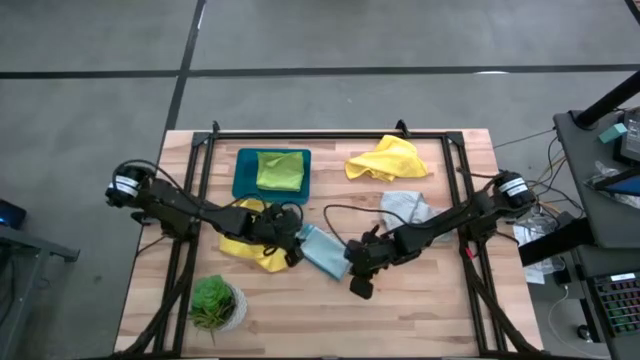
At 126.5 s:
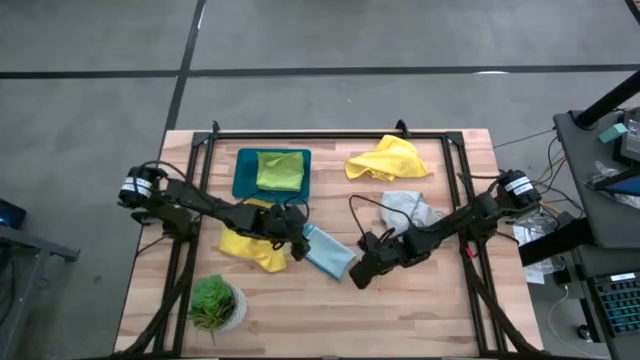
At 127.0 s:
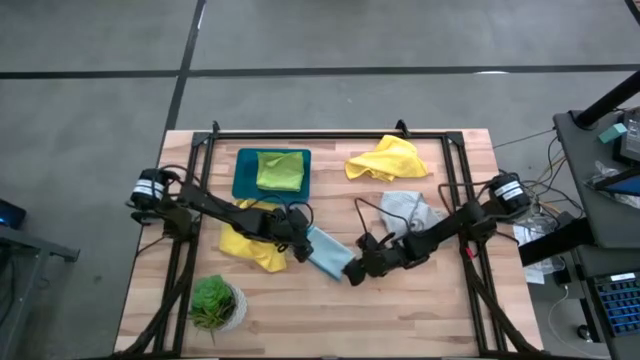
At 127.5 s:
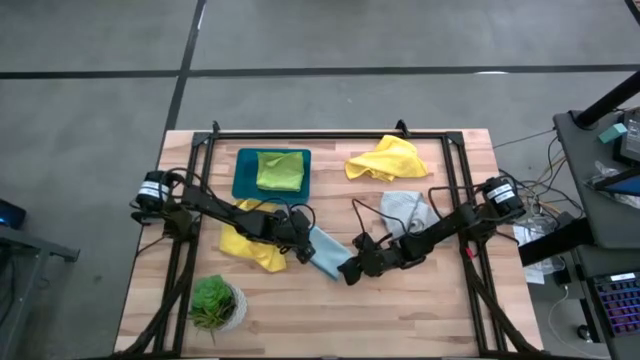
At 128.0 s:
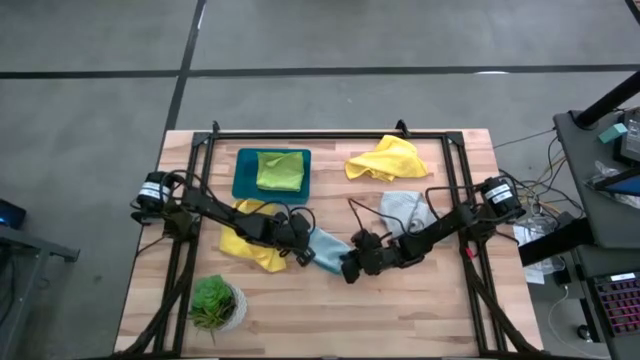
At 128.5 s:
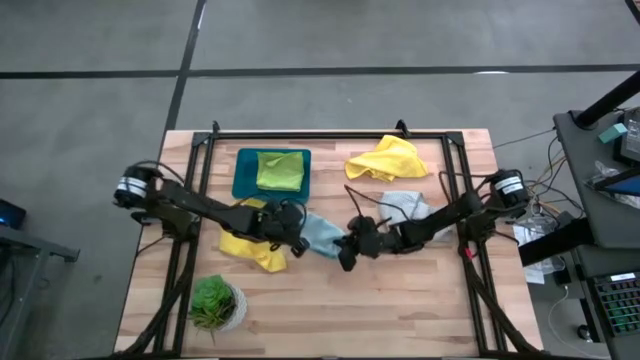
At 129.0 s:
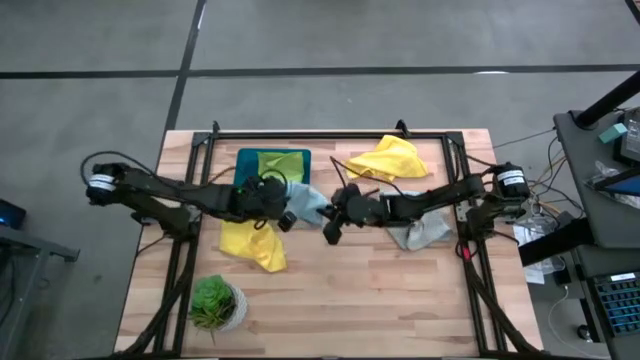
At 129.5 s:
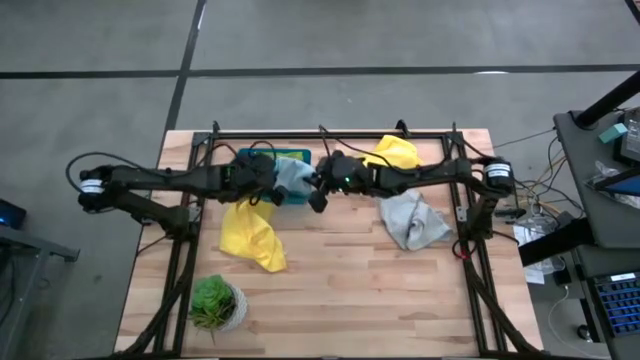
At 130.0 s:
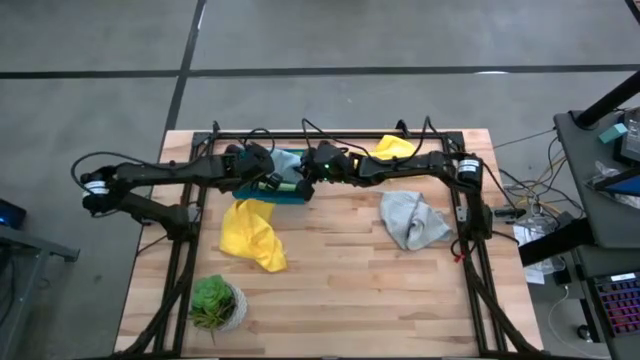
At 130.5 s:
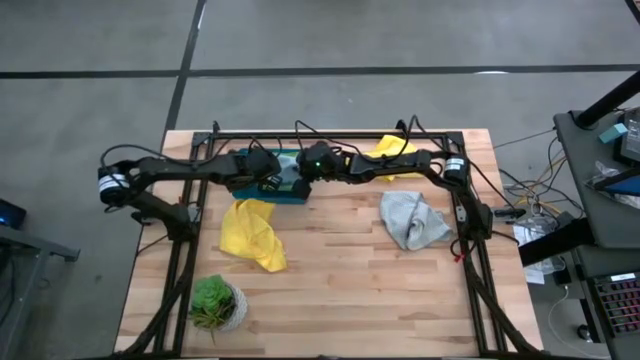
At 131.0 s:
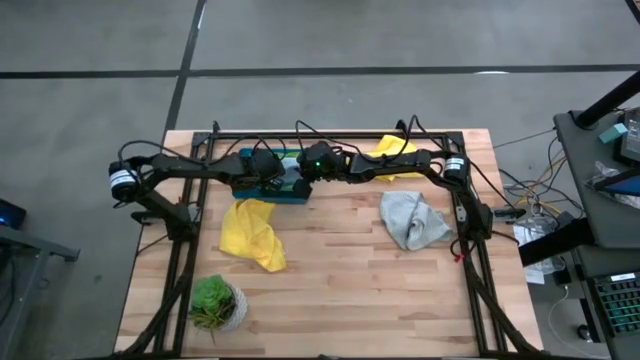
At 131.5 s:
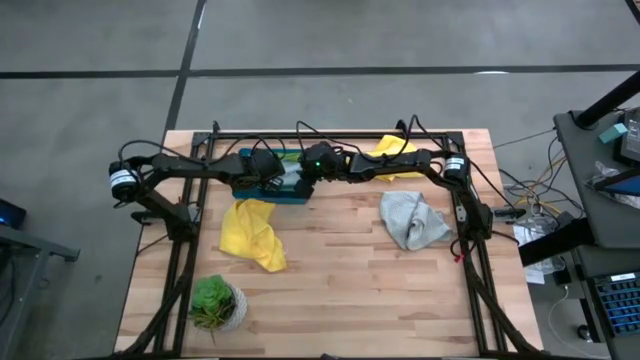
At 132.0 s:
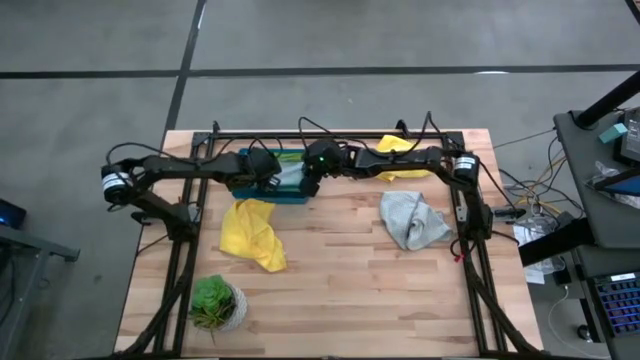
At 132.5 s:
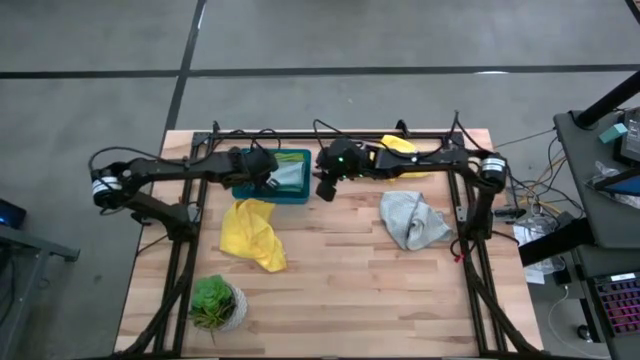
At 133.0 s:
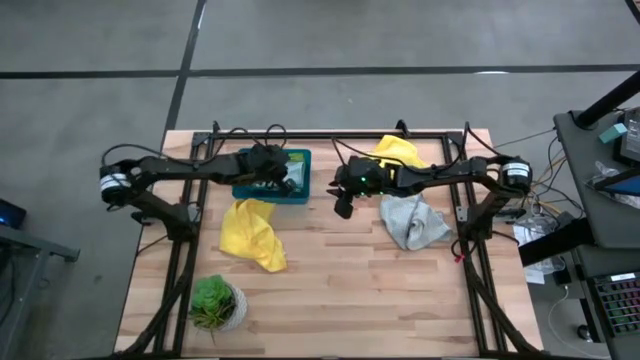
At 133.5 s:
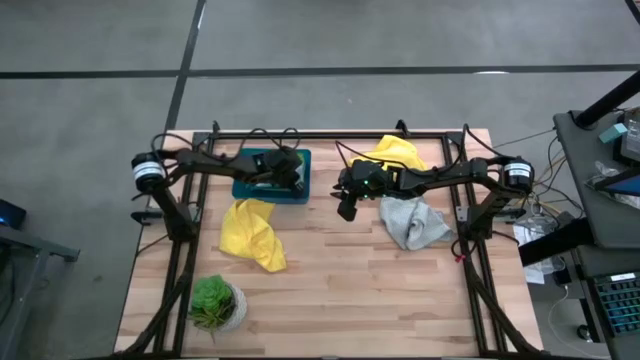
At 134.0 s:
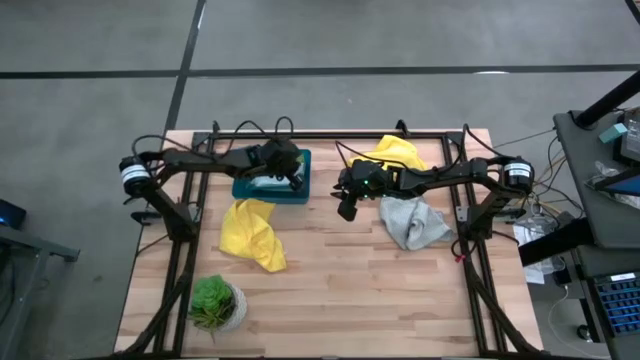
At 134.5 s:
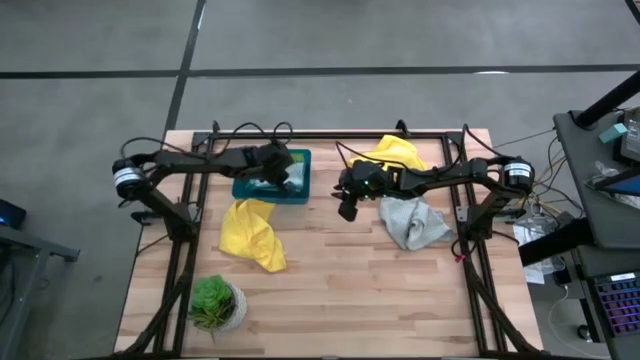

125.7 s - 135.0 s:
Task: Fold microfiber towels
Put the blue microfiber towel into the blue bin

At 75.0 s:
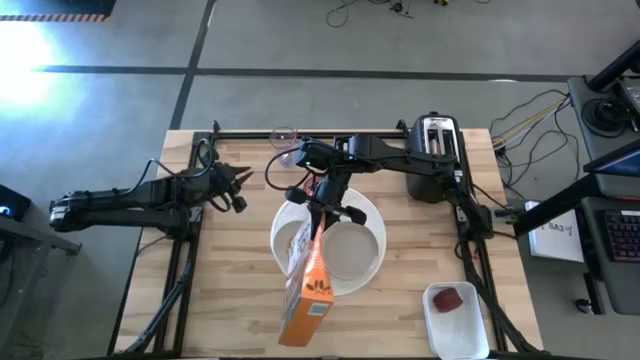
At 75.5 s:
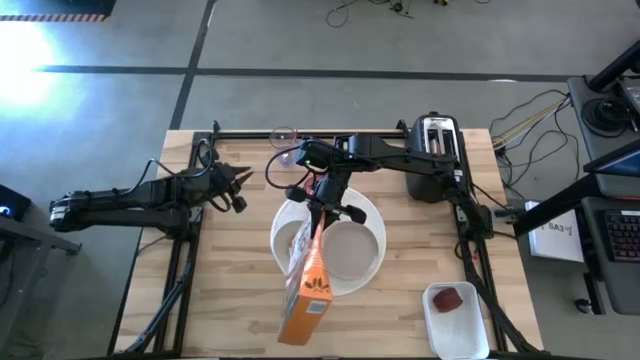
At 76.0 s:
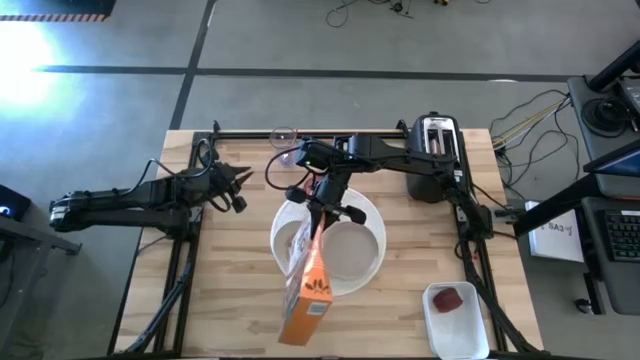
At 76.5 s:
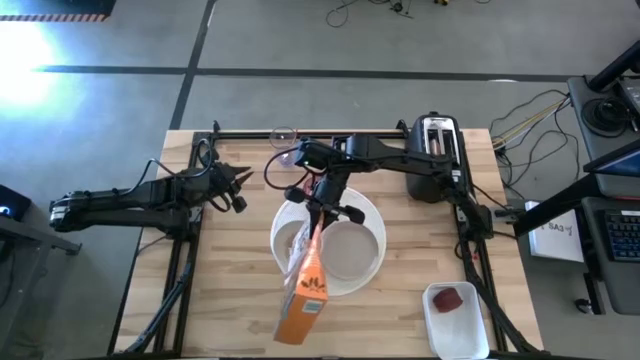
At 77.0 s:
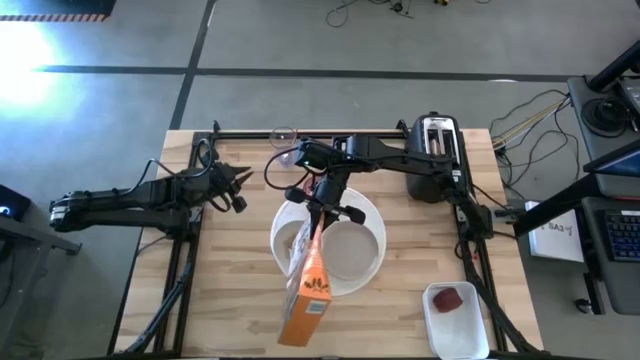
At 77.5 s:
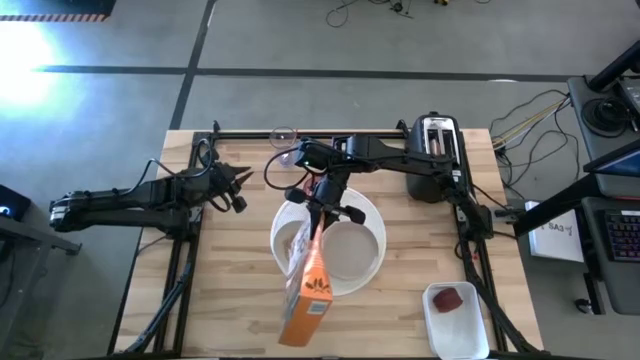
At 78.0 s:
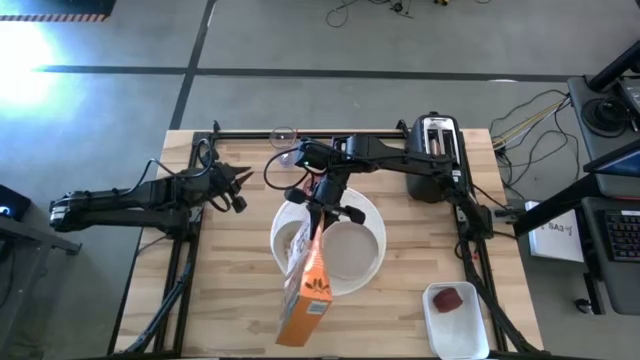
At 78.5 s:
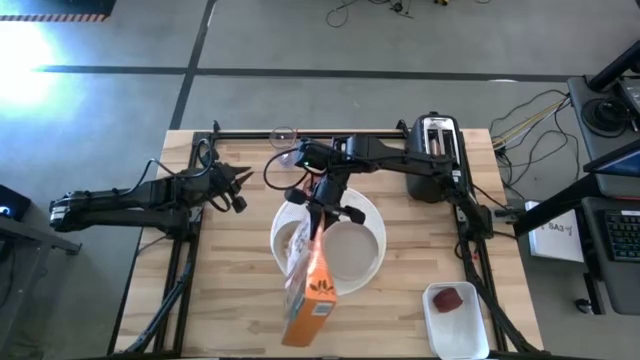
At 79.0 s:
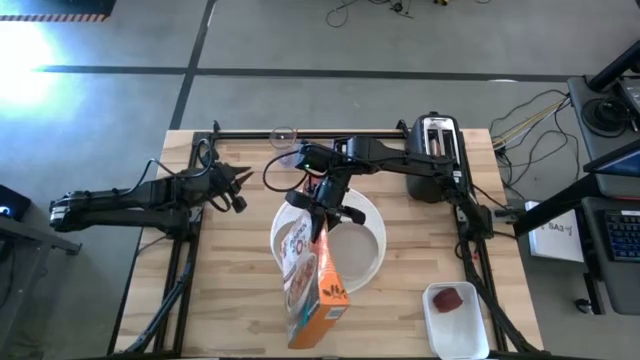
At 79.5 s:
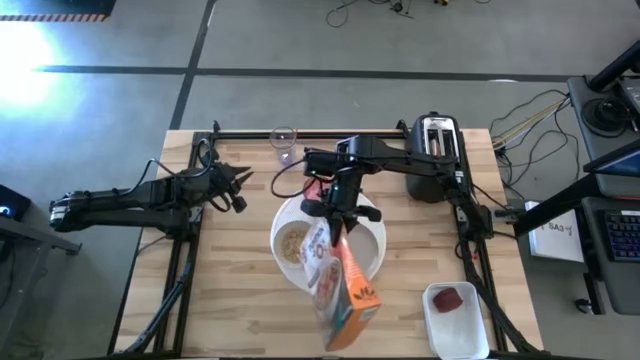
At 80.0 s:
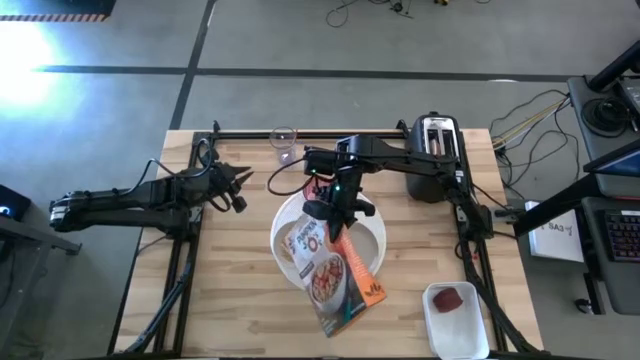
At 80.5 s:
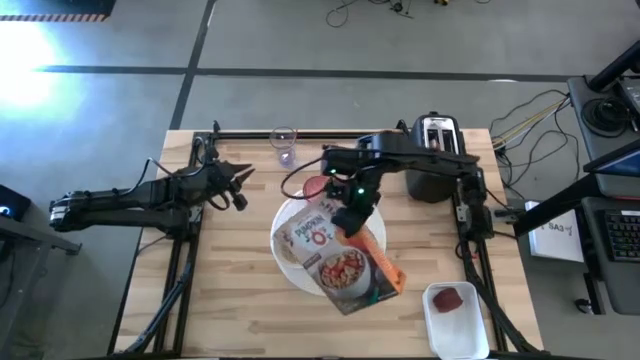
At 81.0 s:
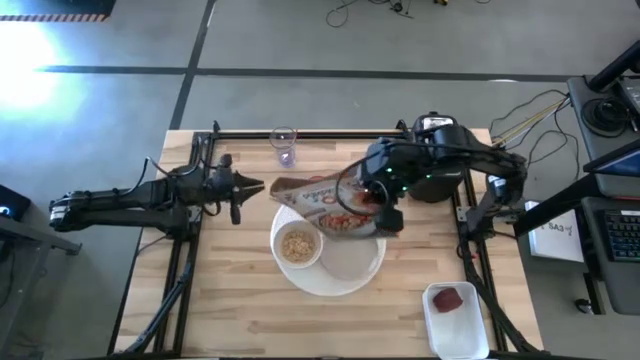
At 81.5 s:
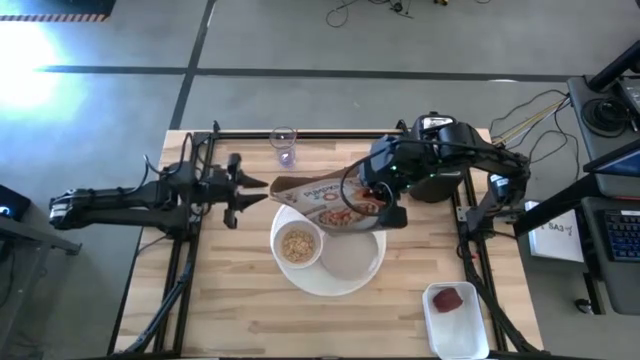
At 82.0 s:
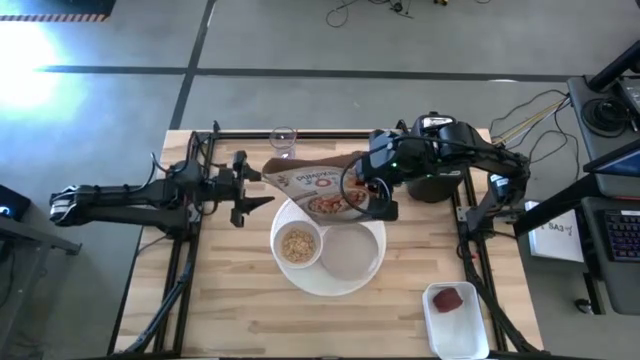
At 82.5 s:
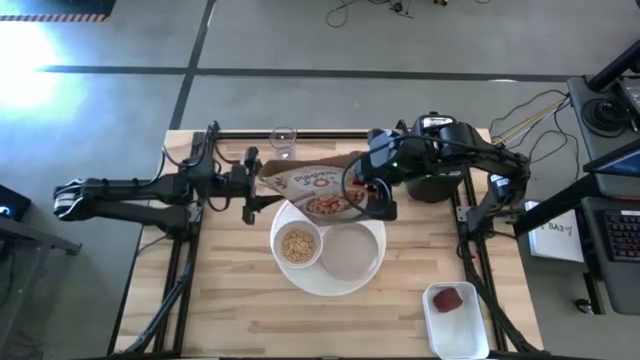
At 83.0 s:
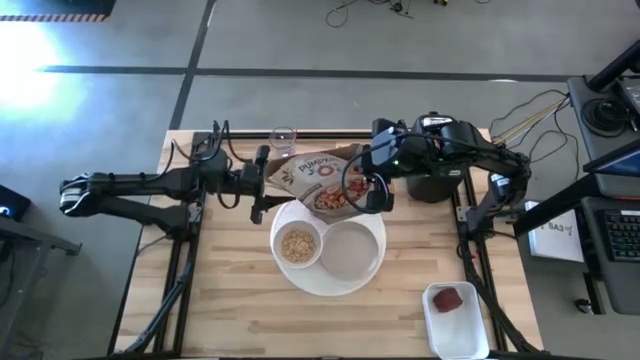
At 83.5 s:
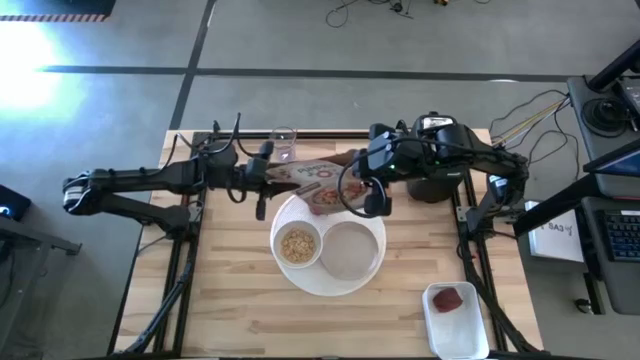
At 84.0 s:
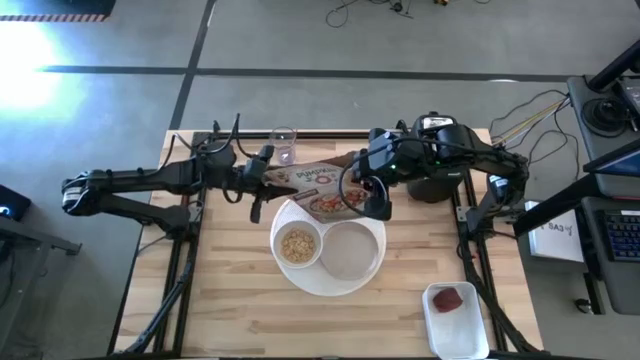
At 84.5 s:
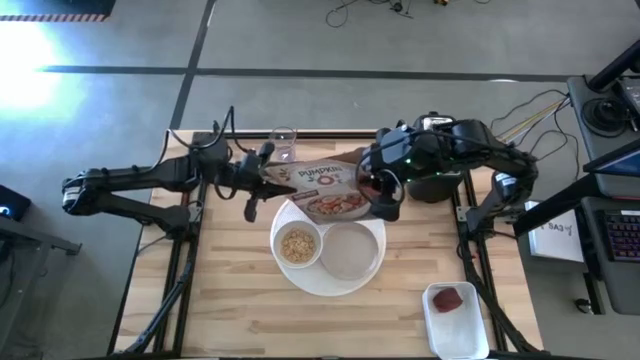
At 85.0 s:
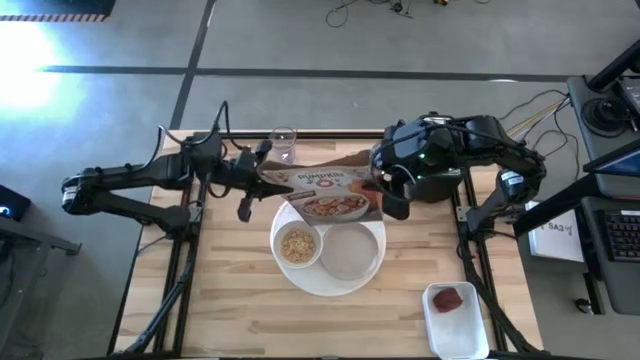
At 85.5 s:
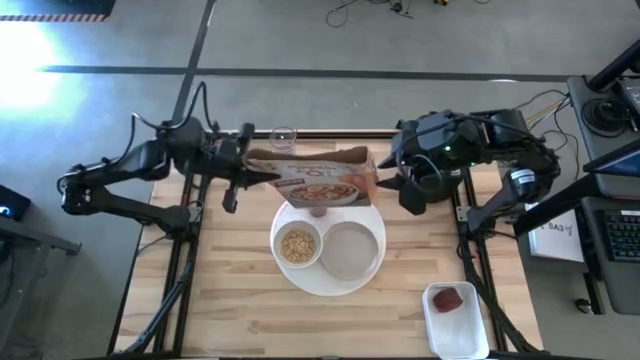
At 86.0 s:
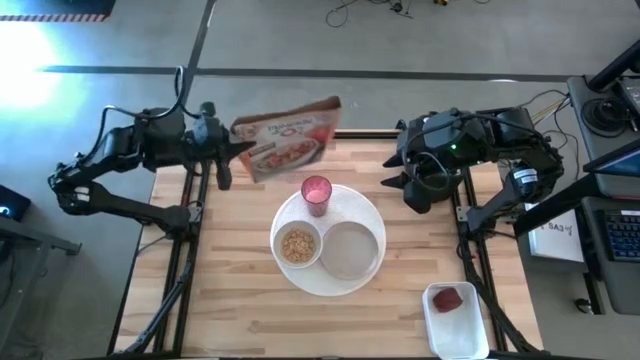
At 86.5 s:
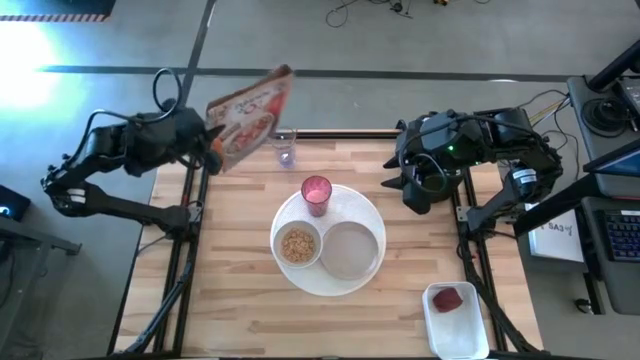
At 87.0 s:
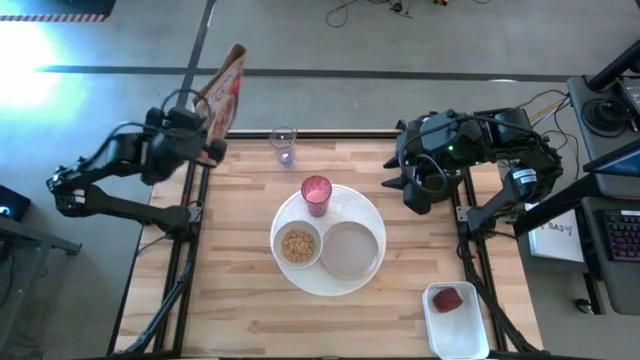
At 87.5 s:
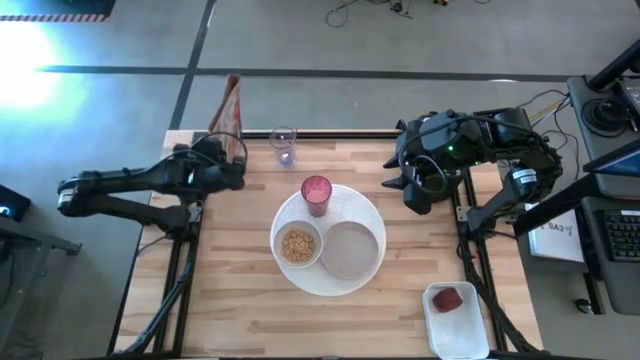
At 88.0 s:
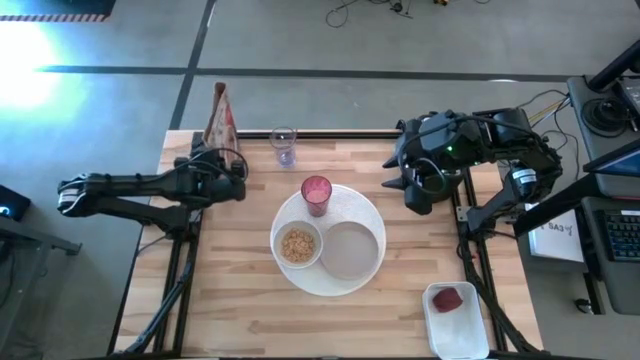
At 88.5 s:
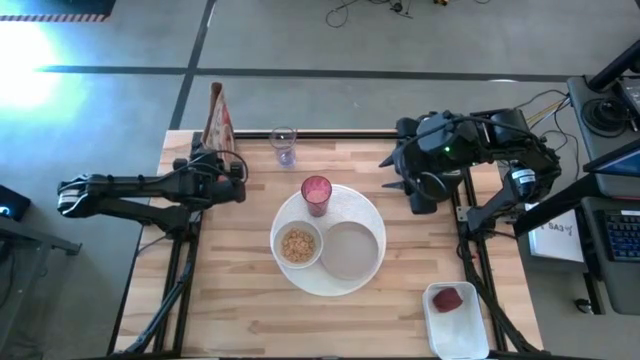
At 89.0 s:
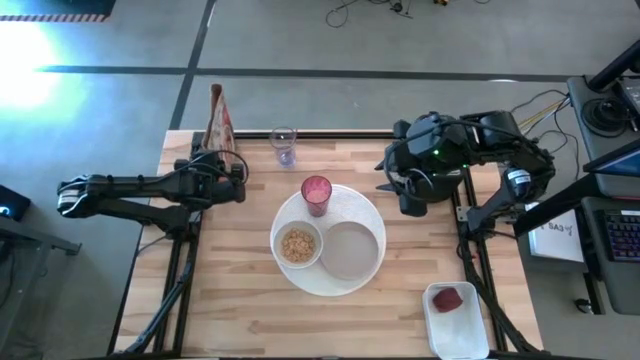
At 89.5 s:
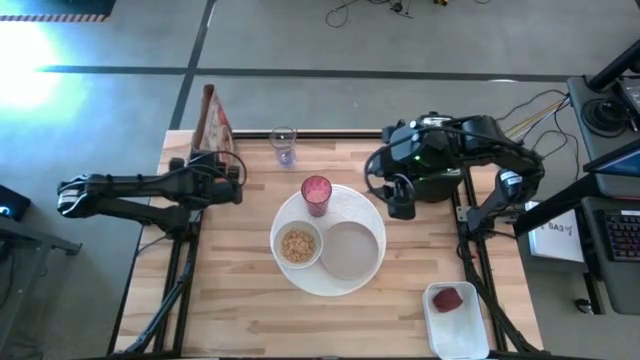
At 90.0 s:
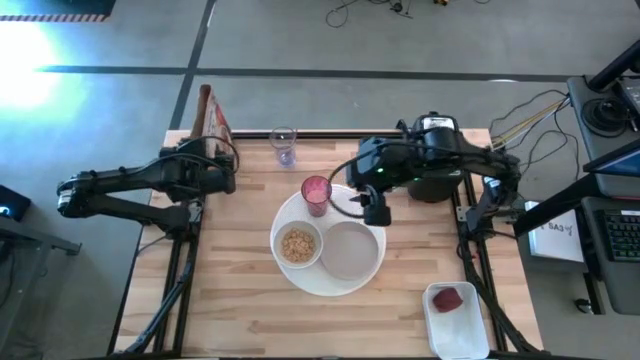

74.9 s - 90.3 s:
Task: Arrange a breakfast setting
Pour the cereals from the cereal box into the white bowl
